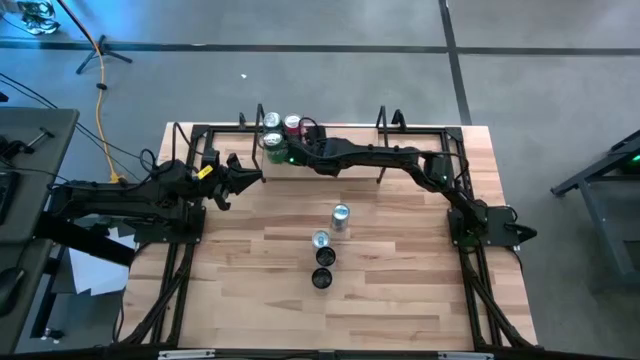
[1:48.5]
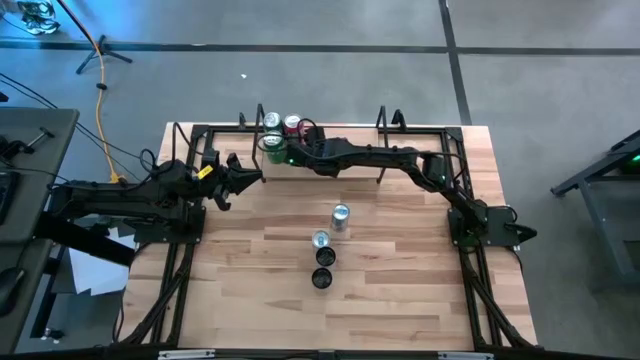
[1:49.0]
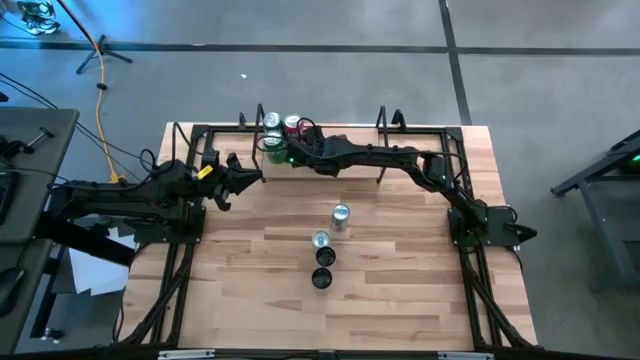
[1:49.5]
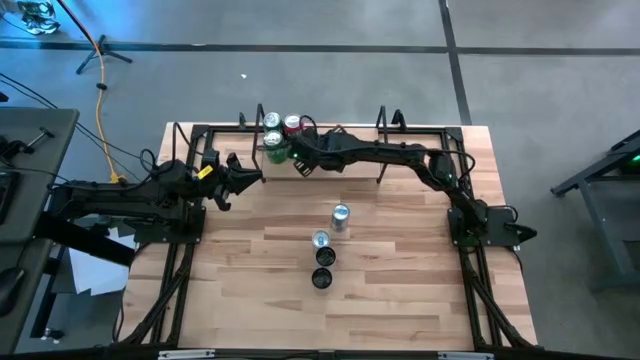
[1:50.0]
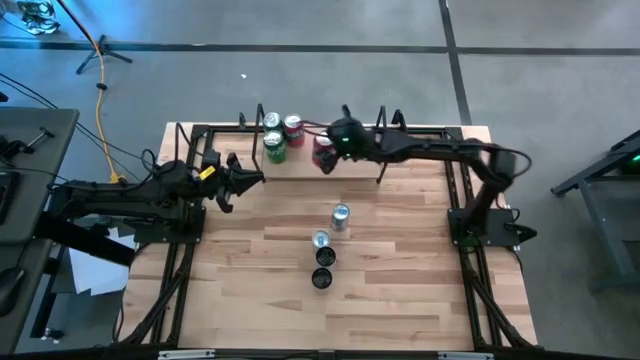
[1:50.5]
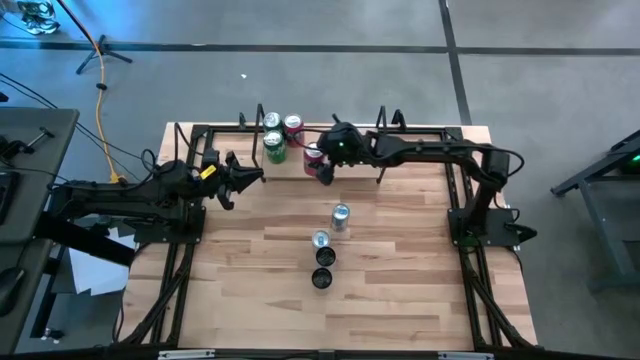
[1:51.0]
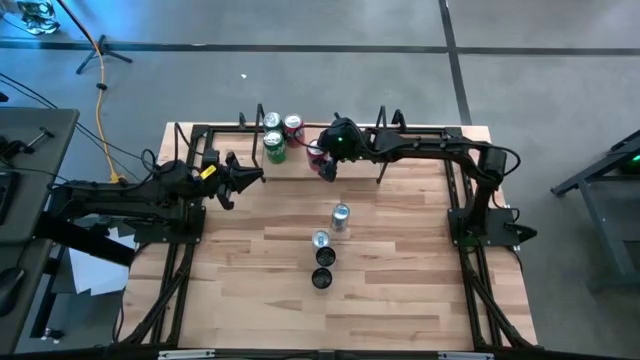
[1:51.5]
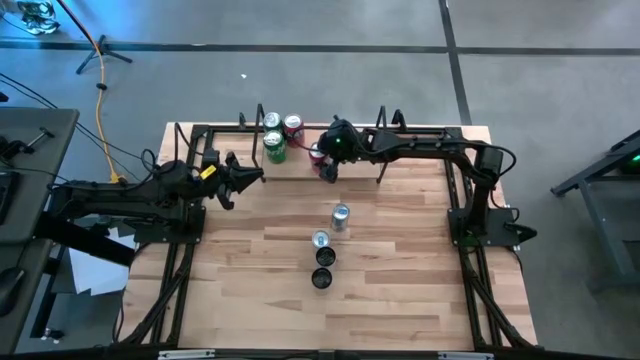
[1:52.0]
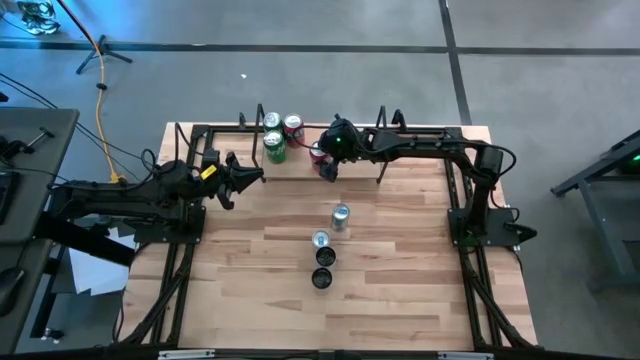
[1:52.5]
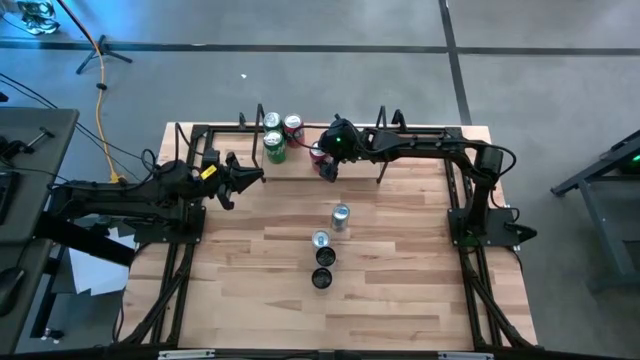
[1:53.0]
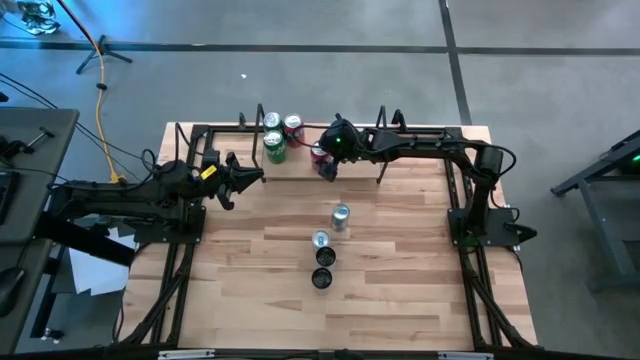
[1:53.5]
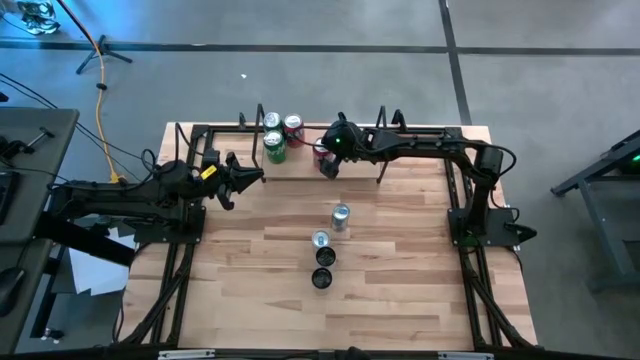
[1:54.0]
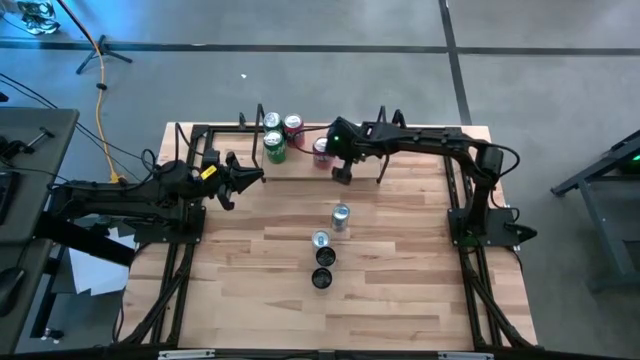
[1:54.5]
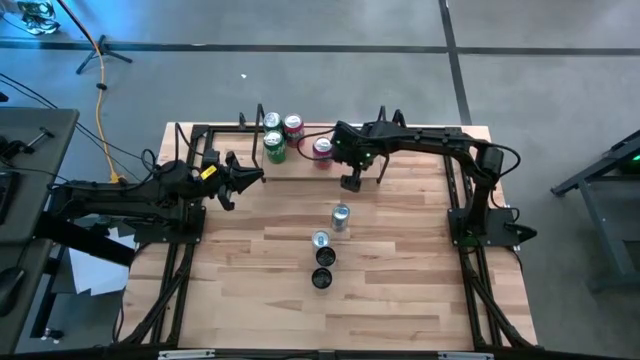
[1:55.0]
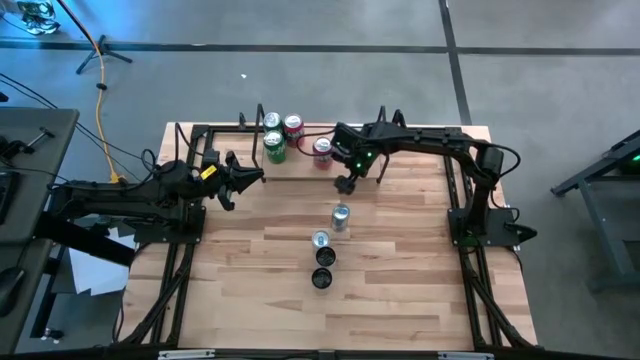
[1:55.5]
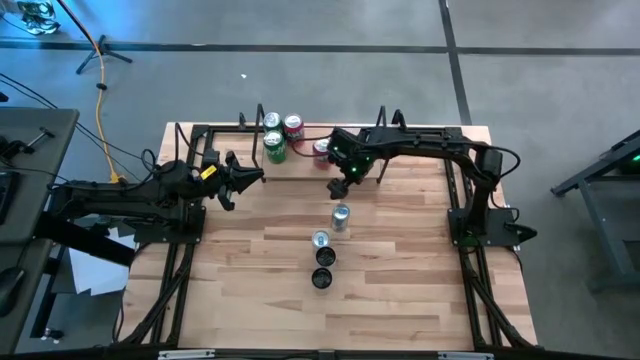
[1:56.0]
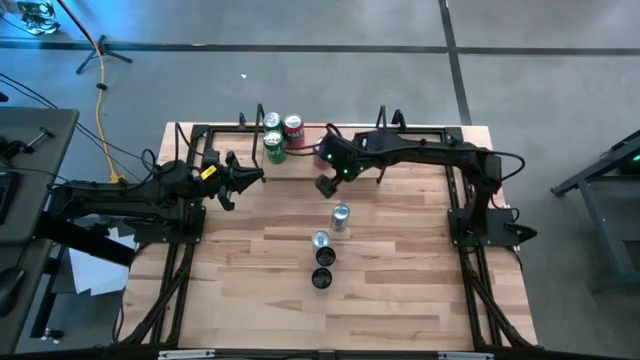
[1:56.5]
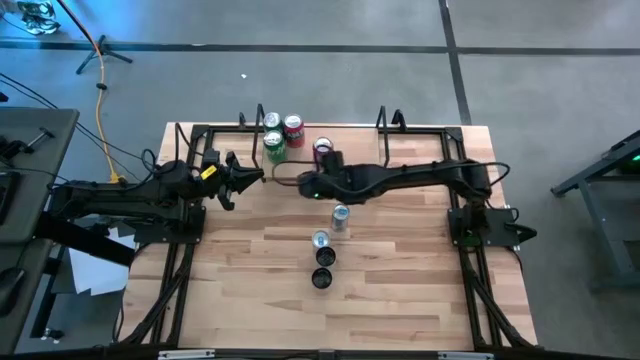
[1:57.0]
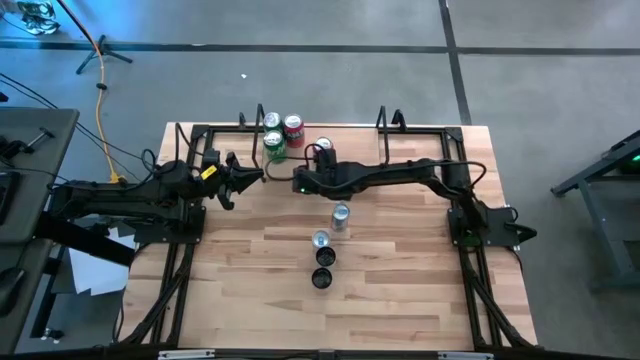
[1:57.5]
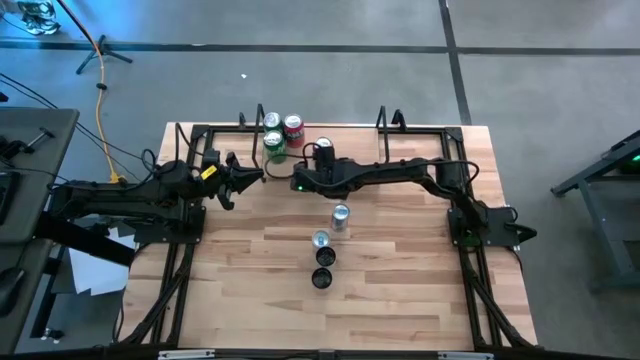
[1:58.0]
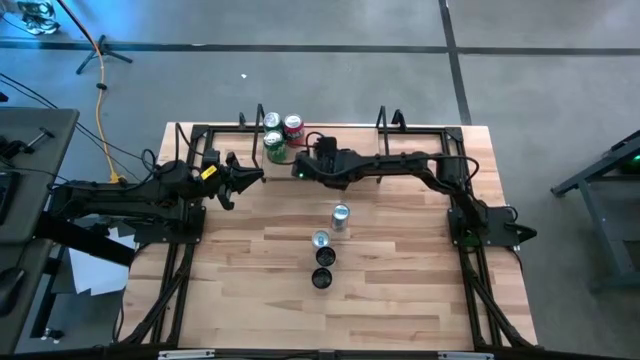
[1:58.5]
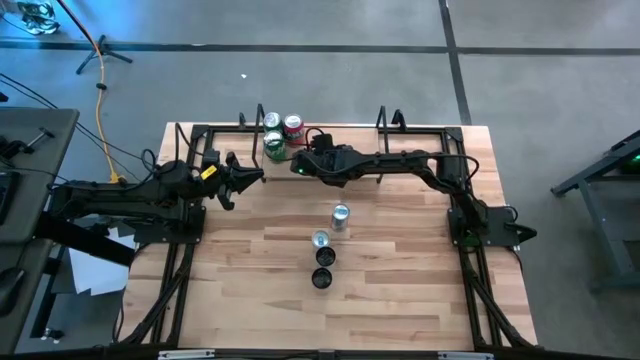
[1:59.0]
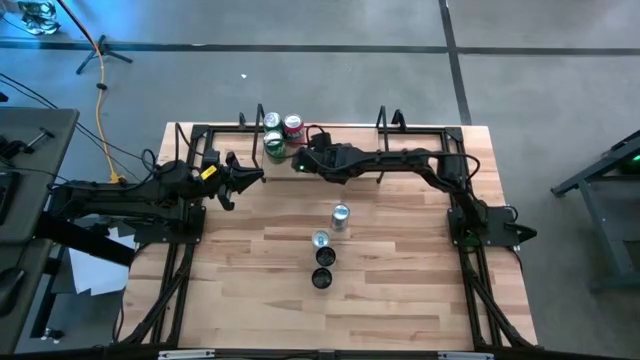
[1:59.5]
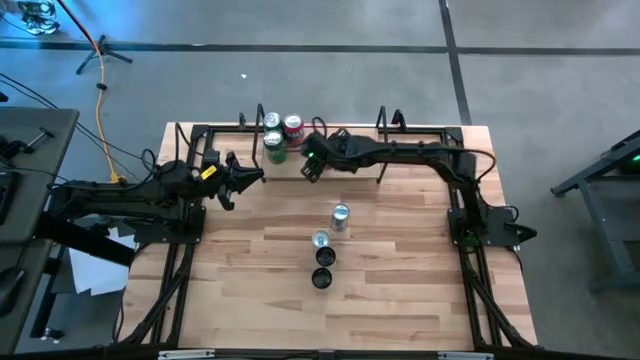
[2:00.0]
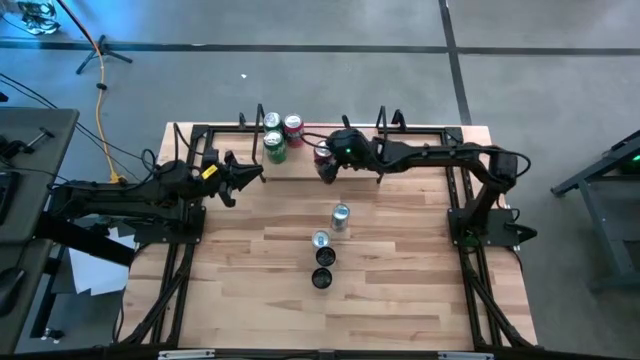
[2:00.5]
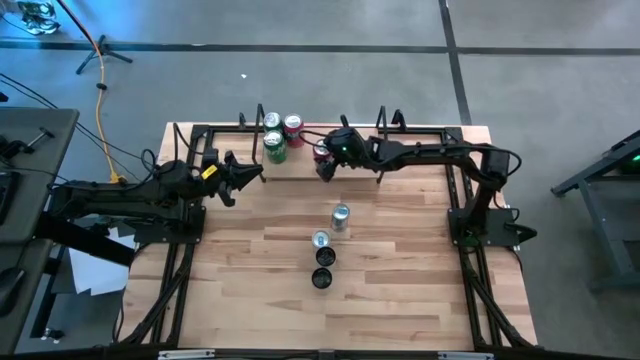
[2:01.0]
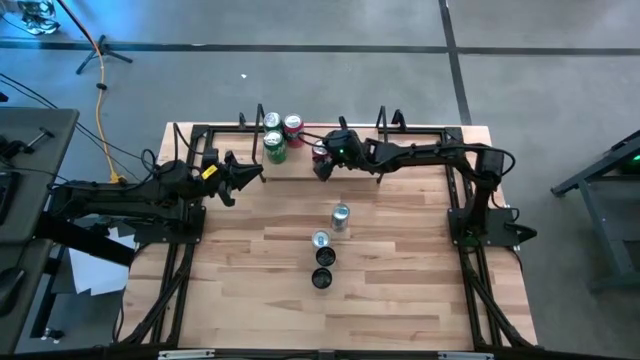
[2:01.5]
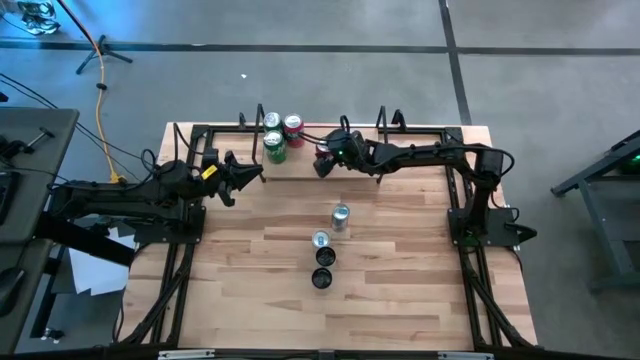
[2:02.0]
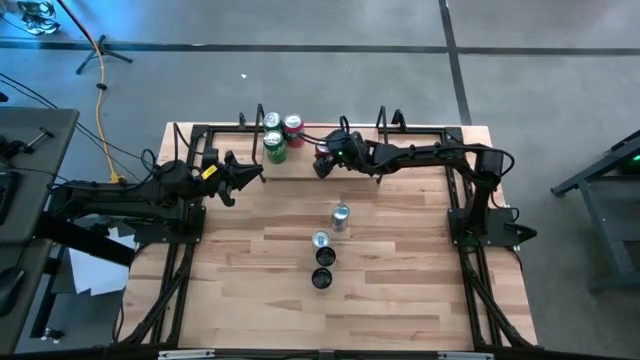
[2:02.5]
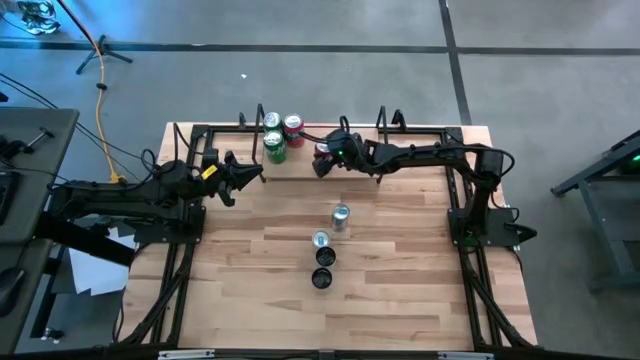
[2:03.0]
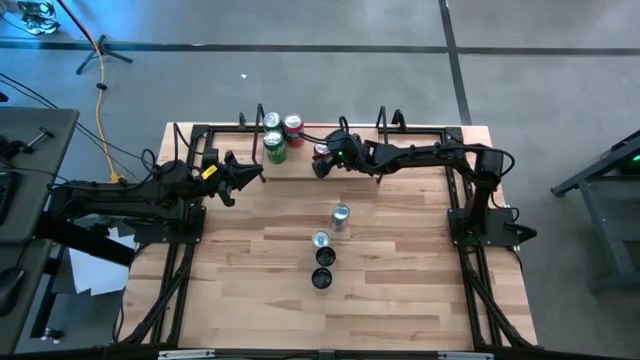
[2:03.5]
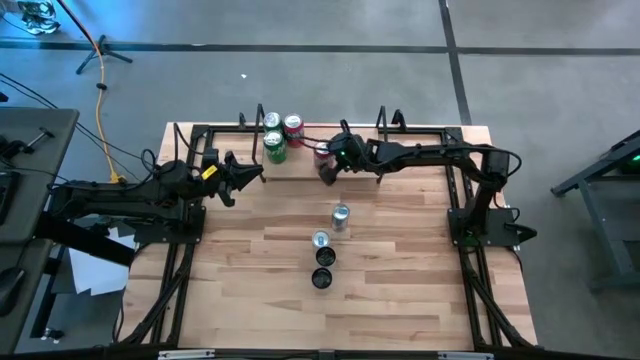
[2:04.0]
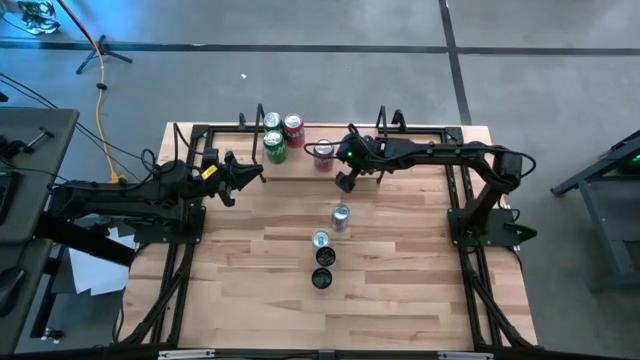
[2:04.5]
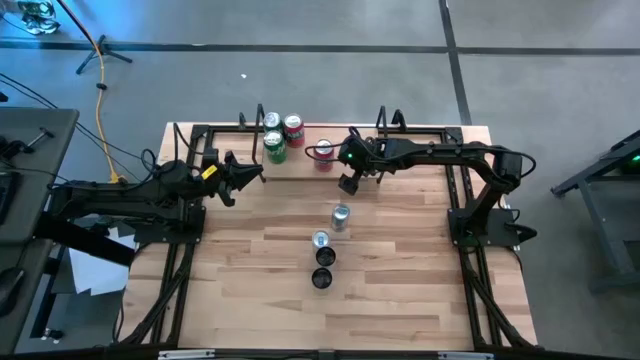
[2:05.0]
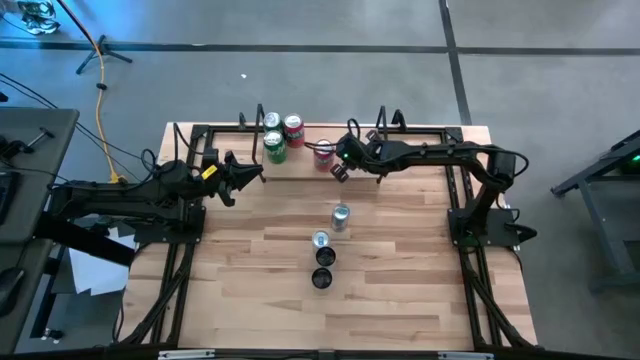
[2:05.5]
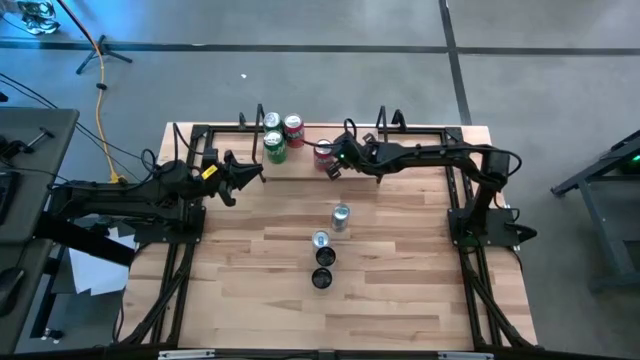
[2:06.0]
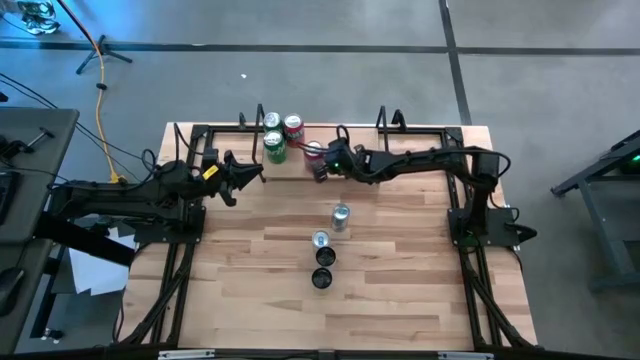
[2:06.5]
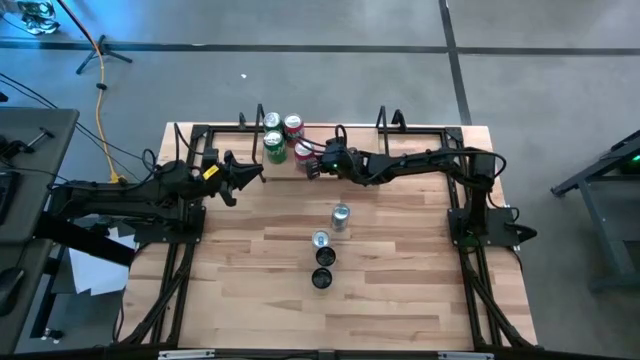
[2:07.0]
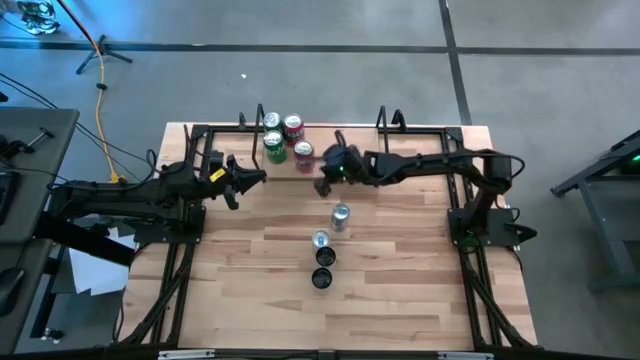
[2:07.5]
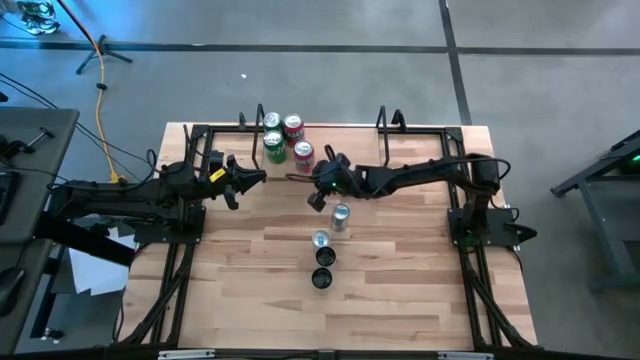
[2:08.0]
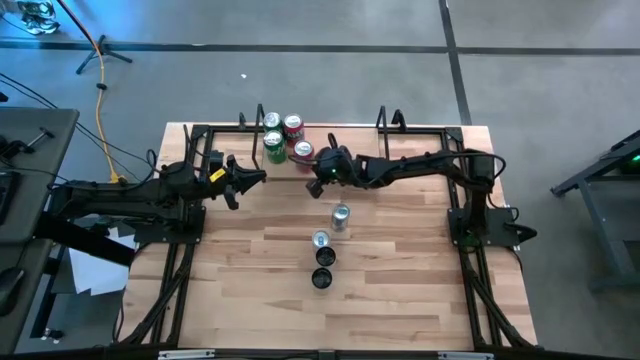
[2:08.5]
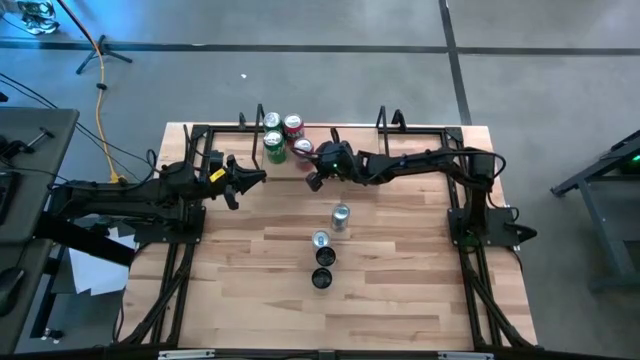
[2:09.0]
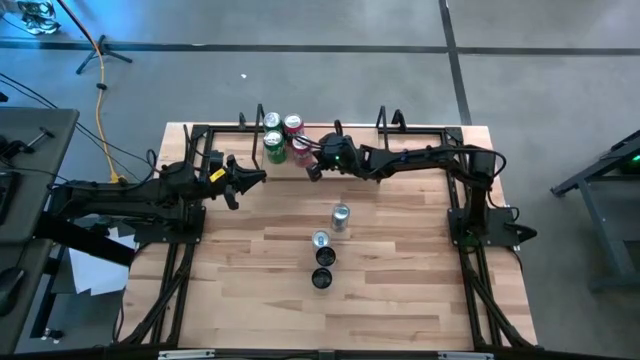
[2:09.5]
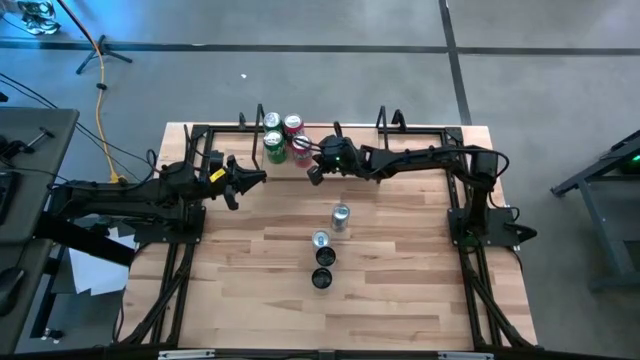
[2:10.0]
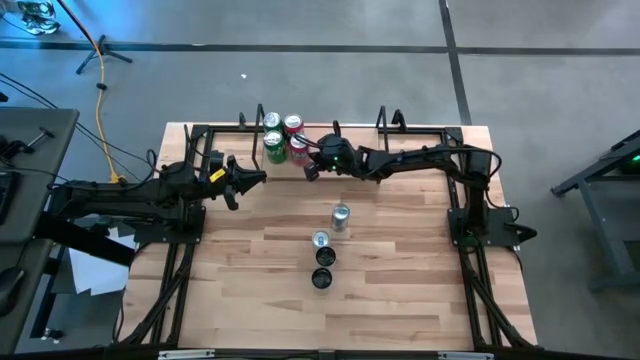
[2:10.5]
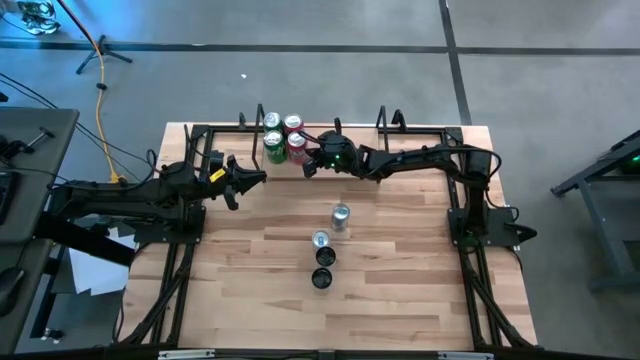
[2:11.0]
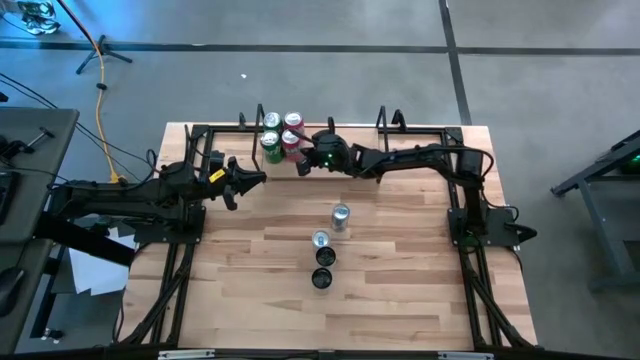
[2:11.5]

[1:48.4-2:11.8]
Task: Place canned beverage on shelf
Put the red soda can on the shelf aligned with the red soda can
